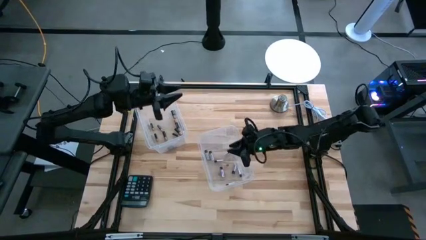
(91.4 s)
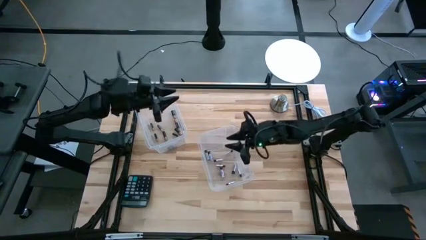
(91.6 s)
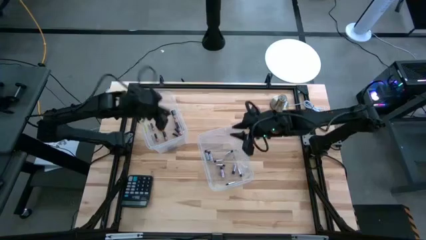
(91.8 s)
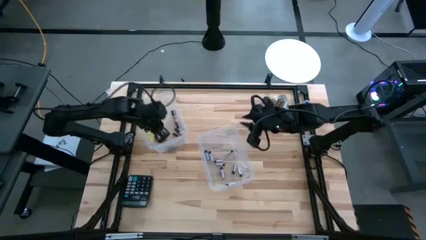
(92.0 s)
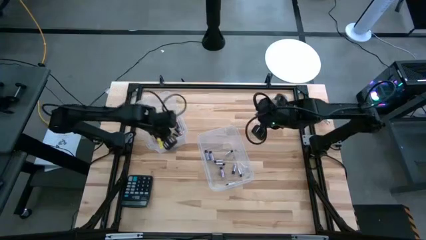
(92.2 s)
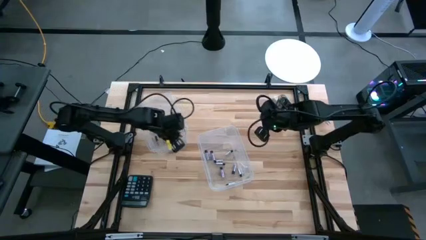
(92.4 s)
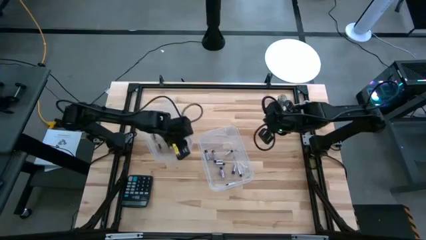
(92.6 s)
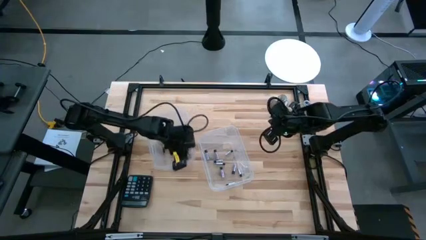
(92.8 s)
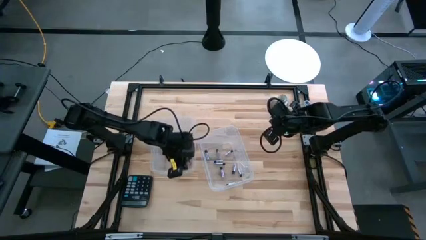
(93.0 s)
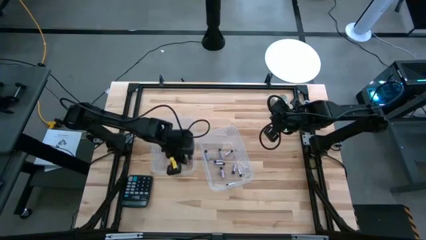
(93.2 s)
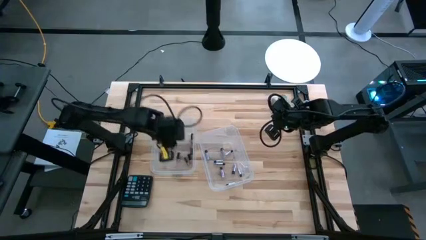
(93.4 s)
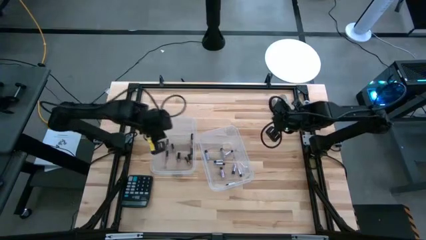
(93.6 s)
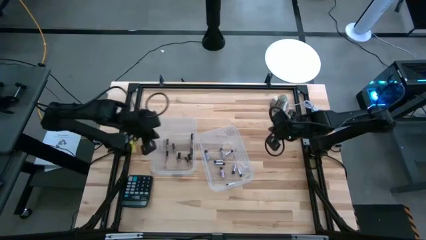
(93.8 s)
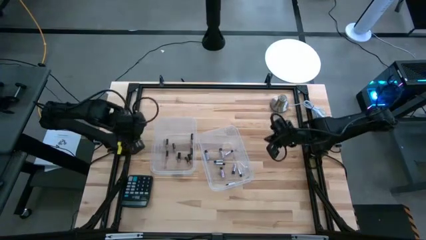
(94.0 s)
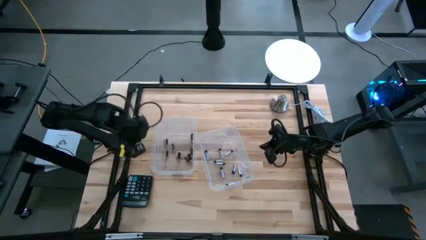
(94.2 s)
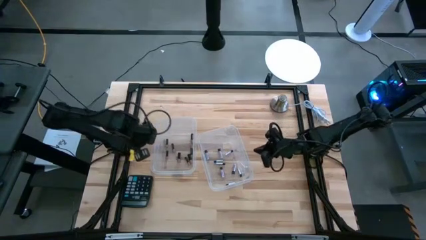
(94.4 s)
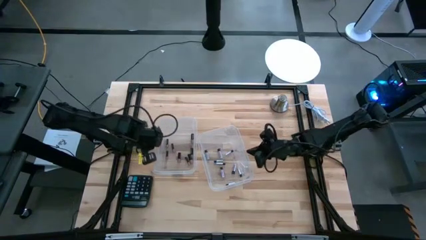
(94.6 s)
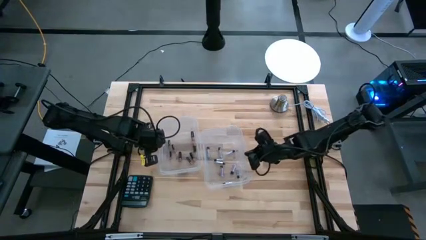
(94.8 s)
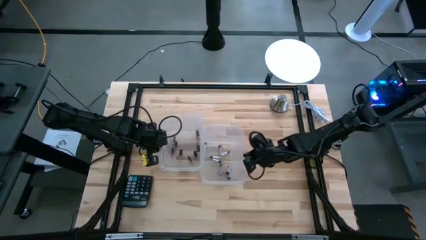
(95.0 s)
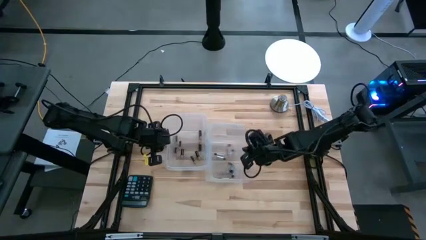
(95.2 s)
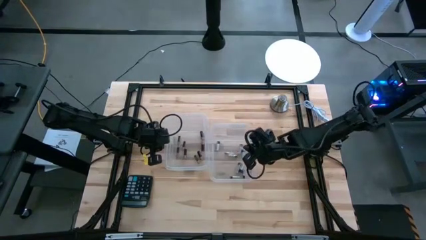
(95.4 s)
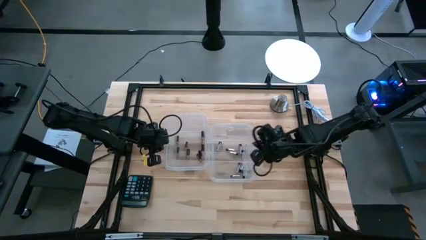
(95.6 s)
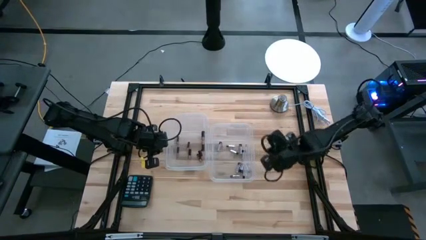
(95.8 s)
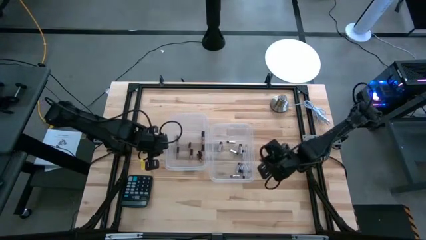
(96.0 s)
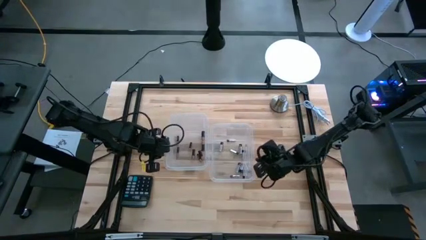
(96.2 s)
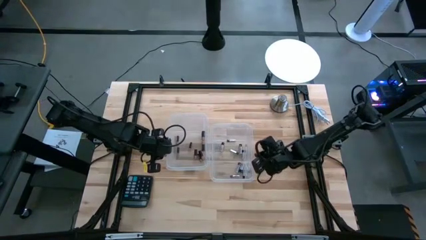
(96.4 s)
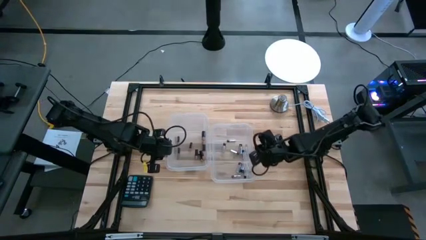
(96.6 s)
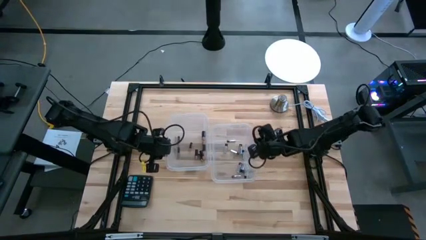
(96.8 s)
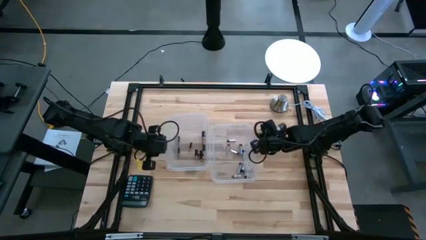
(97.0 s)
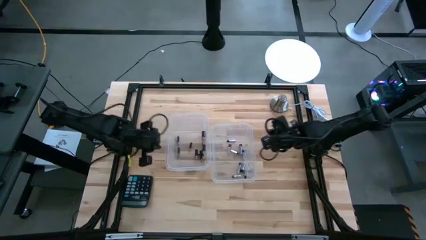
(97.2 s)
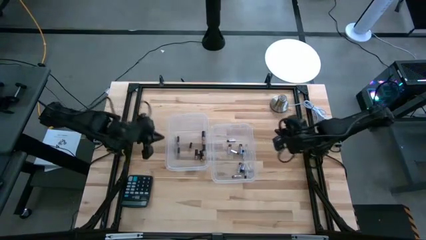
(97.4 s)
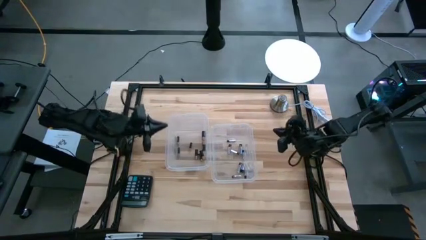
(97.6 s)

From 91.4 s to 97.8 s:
Task: Sort batteries
Adjust the transparent bins

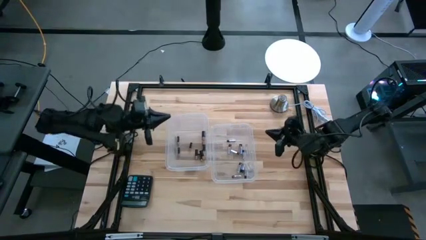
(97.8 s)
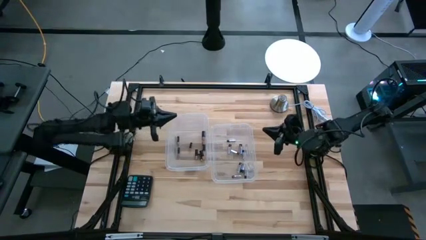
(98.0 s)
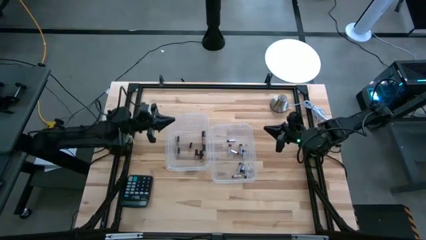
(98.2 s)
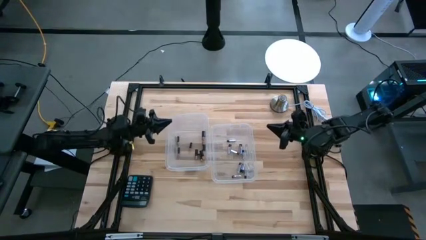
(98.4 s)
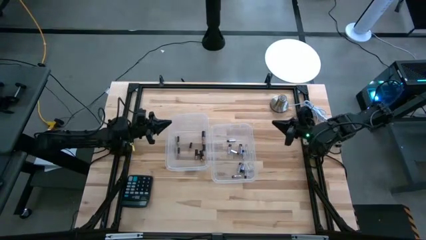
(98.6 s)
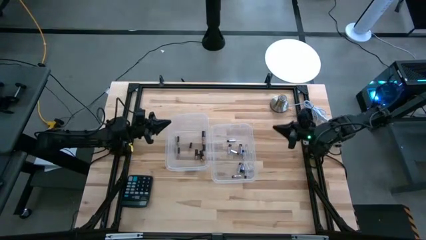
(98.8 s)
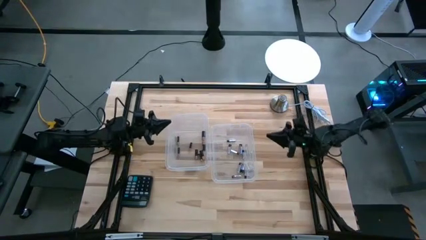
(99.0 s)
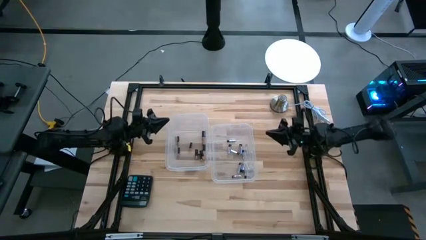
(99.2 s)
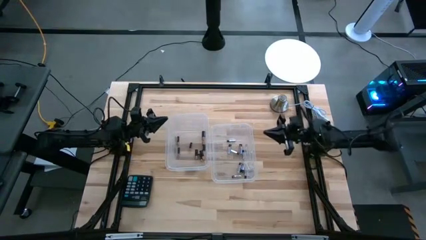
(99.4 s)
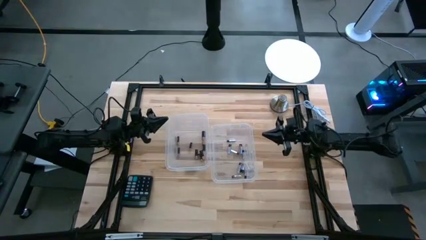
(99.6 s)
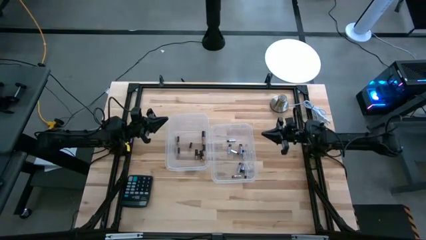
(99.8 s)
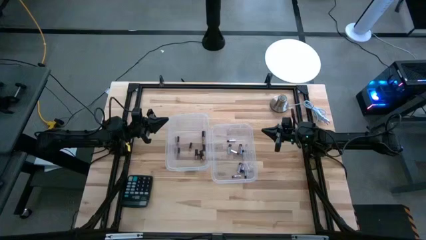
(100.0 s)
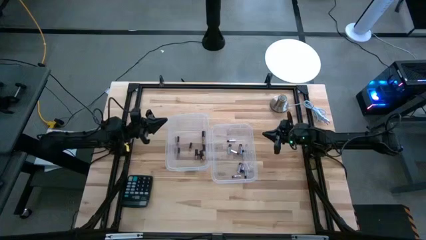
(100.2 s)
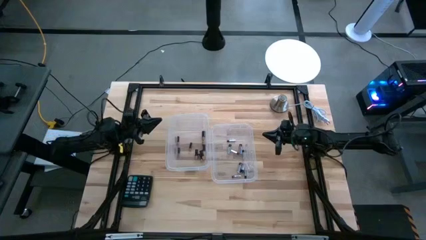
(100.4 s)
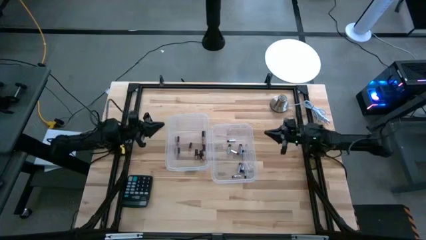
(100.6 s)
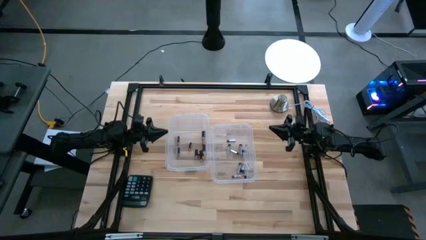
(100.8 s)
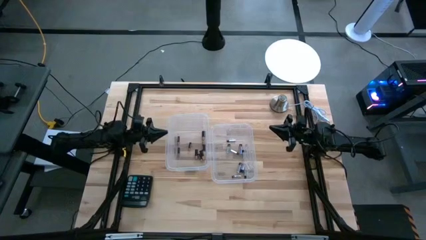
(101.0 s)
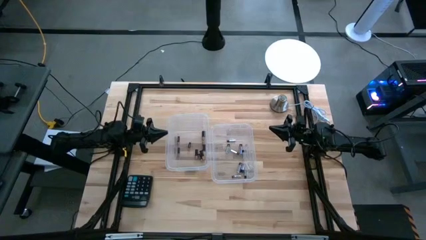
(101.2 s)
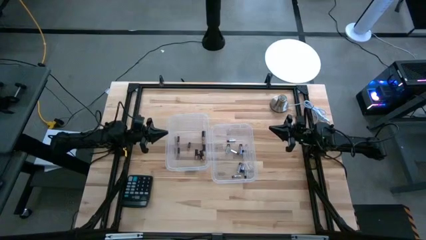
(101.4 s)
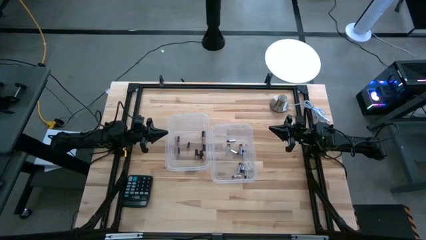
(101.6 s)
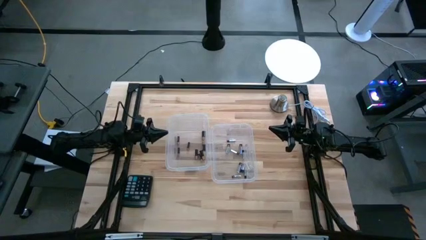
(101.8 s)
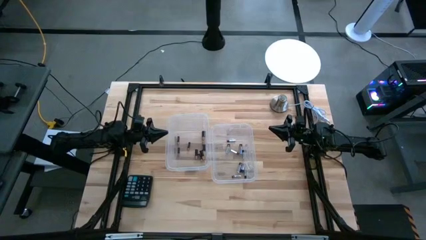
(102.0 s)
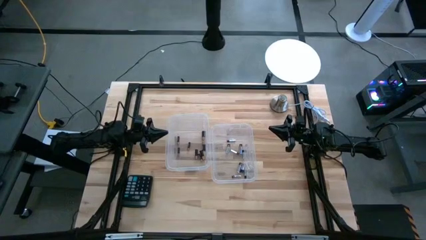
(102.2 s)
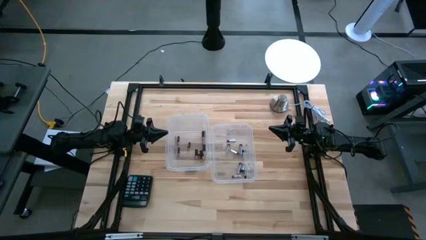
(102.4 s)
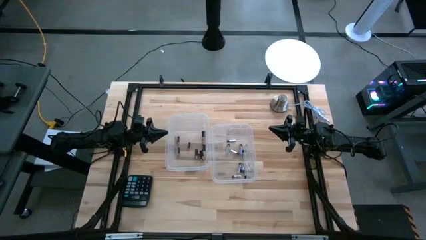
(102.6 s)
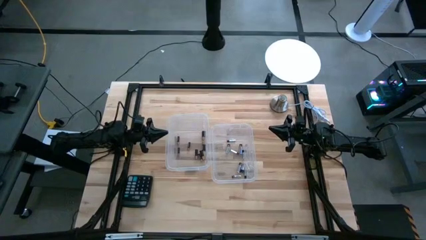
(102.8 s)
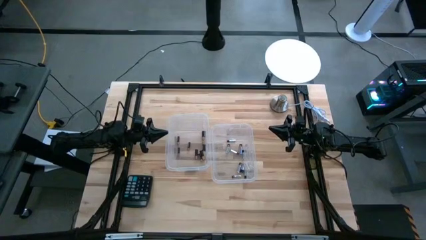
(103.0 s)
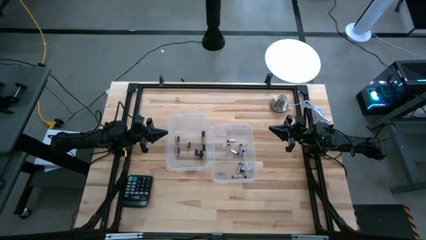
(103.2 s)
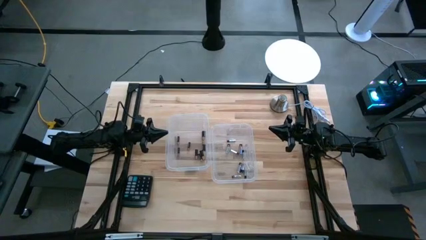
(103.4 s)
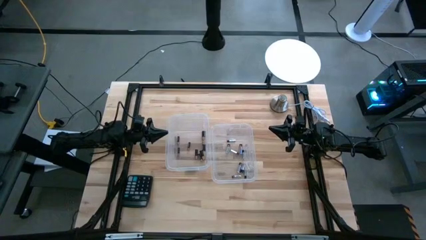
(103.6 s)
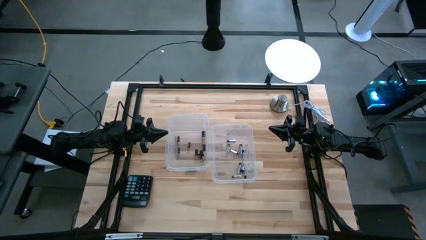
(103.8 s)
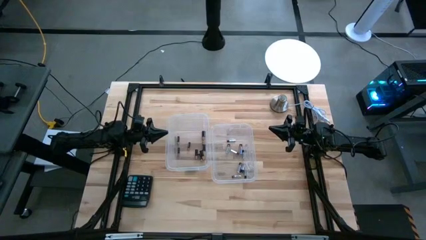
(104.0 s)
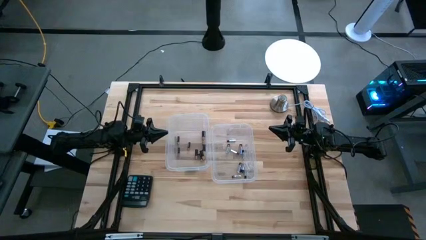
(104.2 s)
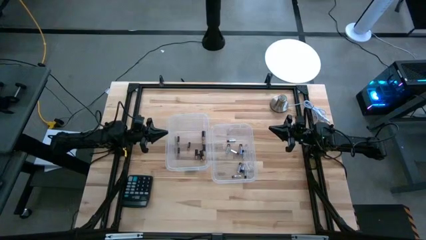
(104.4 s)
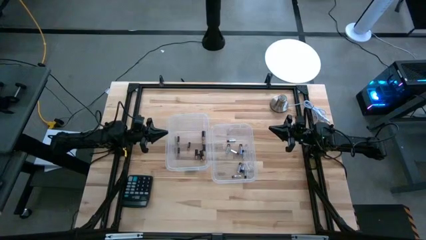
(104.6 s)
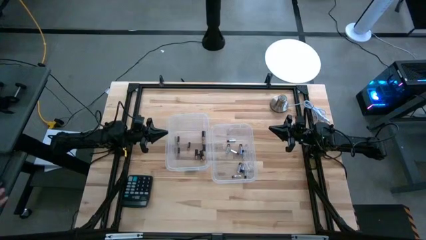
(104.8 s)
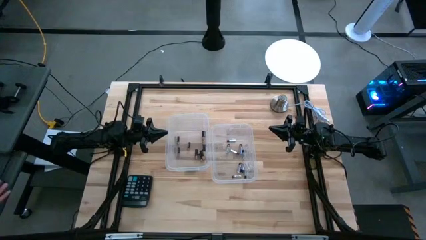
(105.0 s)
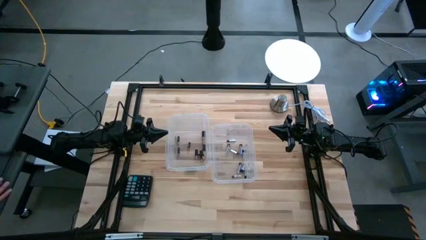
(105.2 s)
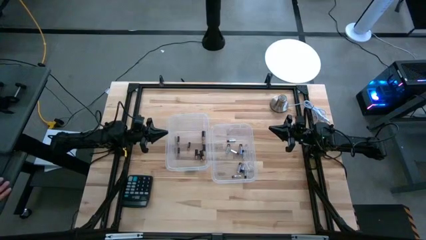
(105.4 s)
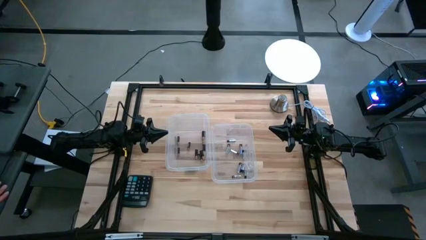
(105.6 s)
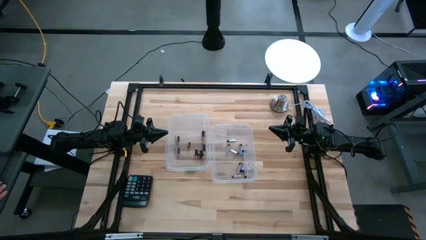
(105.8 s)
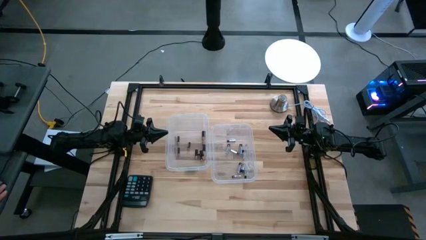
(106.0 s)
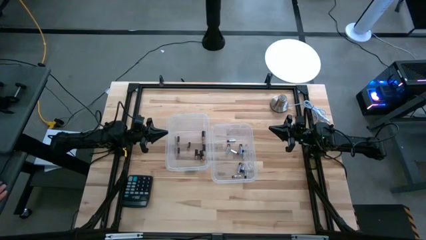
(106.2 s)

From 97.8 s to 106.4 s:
Return to Home Position
